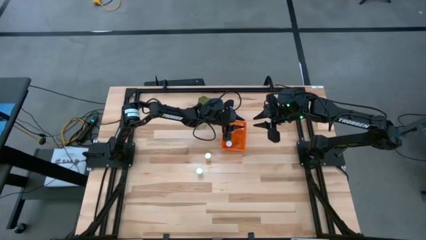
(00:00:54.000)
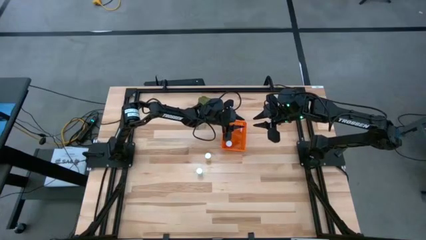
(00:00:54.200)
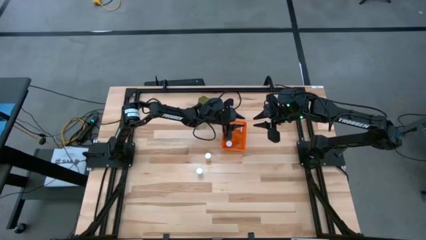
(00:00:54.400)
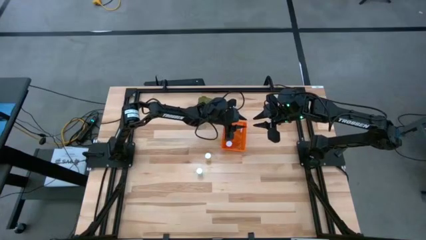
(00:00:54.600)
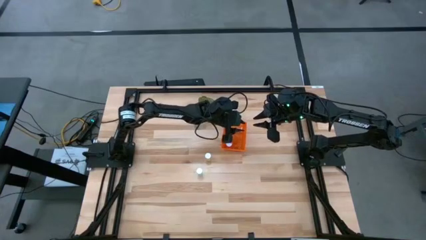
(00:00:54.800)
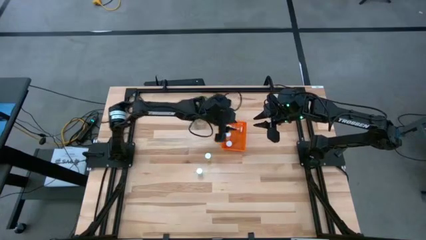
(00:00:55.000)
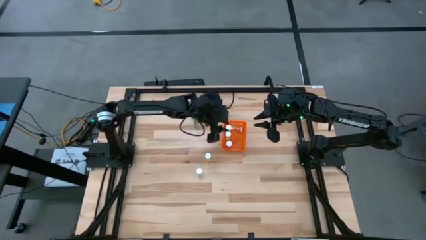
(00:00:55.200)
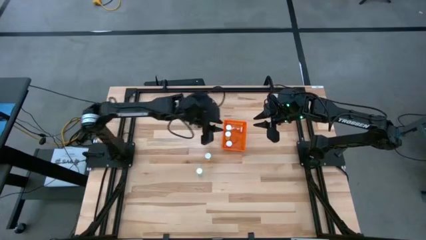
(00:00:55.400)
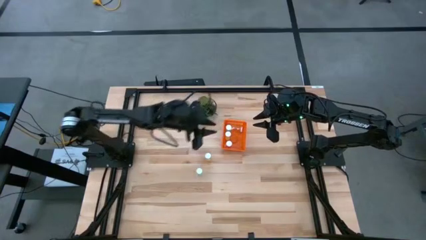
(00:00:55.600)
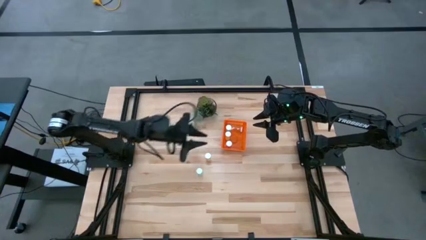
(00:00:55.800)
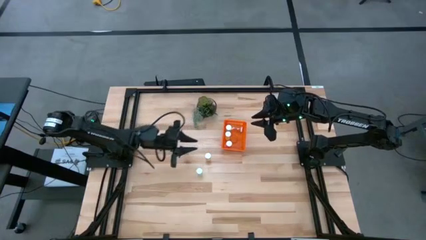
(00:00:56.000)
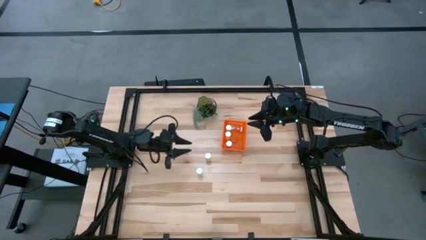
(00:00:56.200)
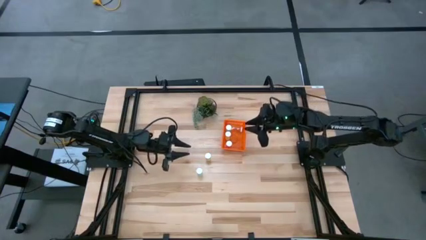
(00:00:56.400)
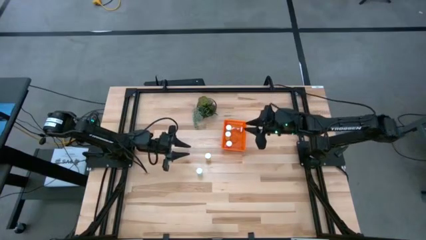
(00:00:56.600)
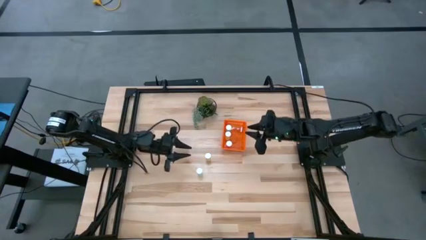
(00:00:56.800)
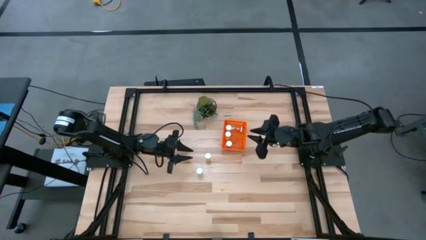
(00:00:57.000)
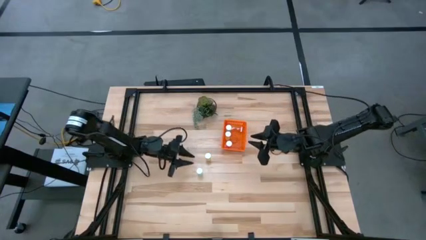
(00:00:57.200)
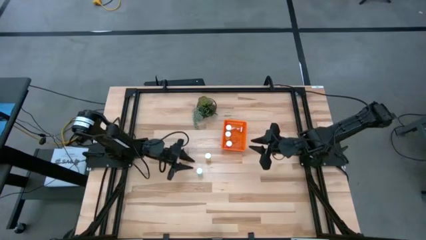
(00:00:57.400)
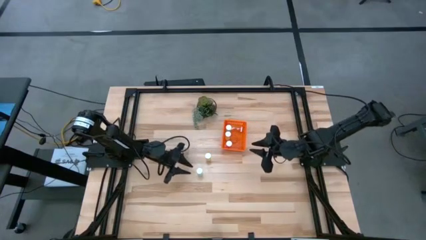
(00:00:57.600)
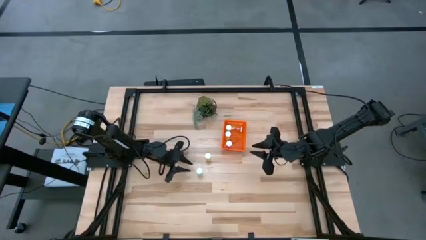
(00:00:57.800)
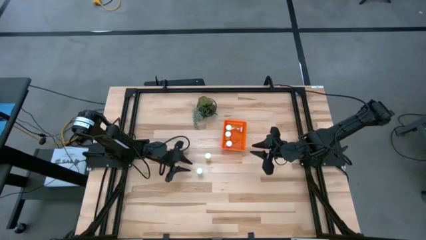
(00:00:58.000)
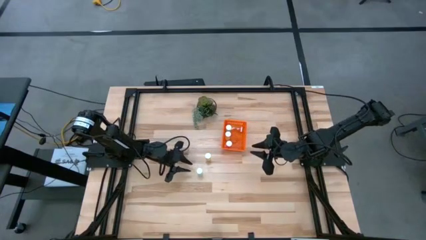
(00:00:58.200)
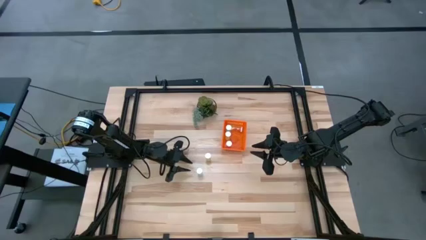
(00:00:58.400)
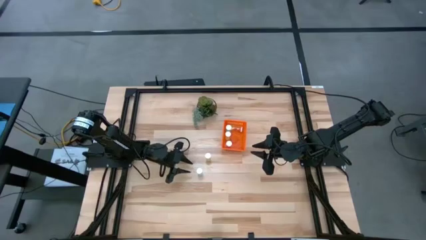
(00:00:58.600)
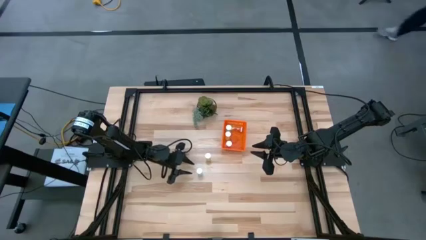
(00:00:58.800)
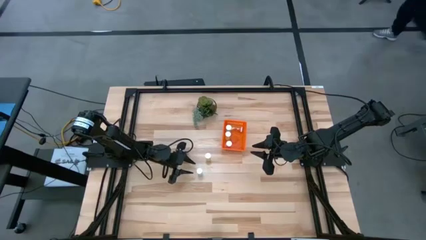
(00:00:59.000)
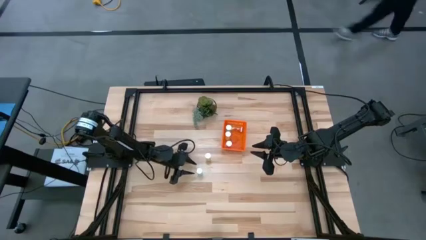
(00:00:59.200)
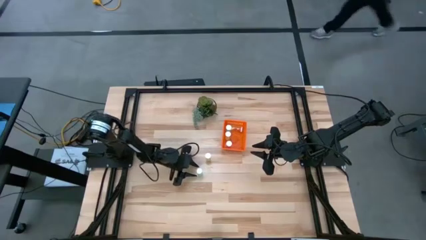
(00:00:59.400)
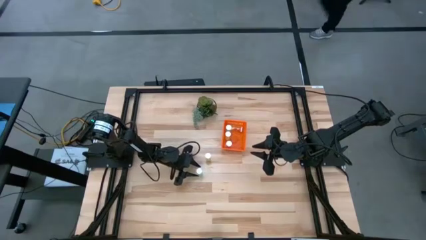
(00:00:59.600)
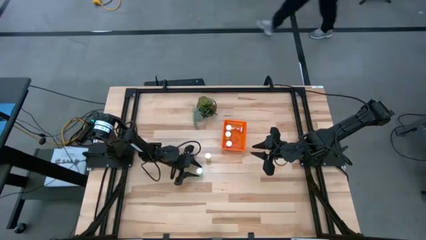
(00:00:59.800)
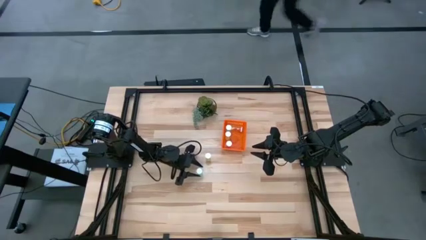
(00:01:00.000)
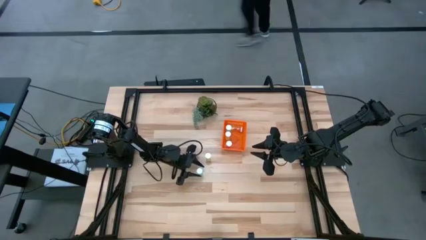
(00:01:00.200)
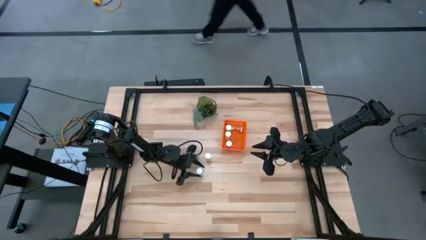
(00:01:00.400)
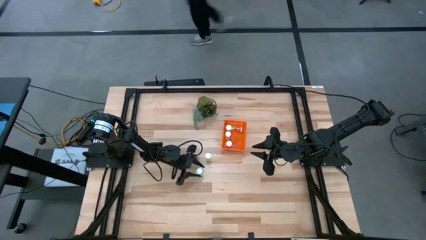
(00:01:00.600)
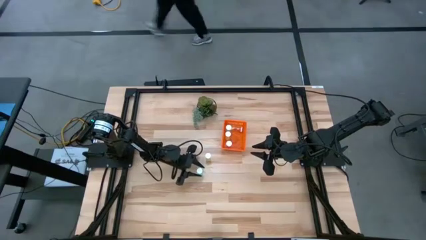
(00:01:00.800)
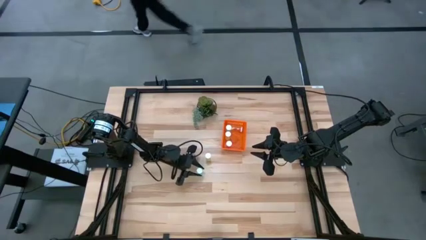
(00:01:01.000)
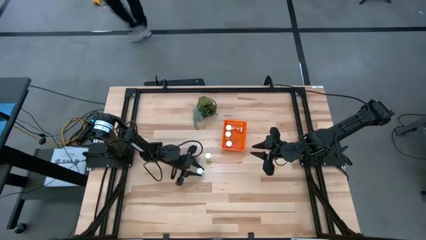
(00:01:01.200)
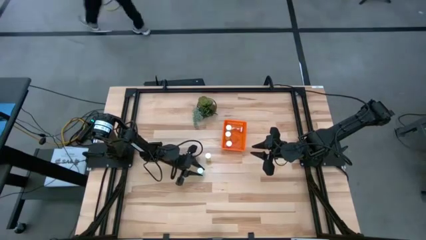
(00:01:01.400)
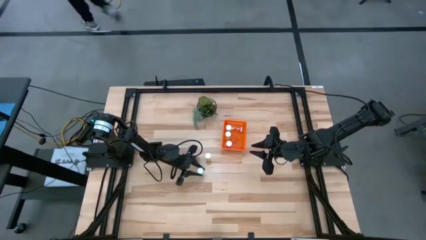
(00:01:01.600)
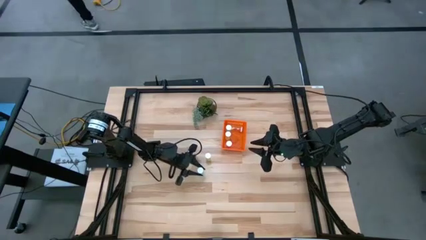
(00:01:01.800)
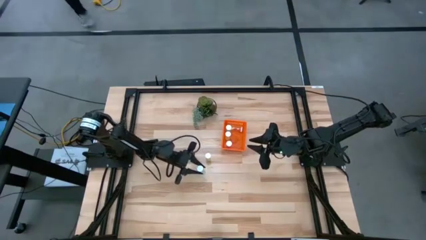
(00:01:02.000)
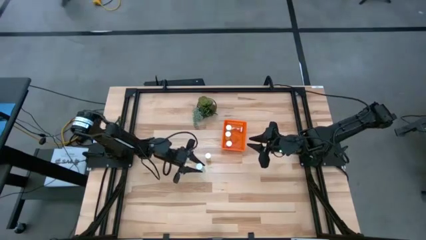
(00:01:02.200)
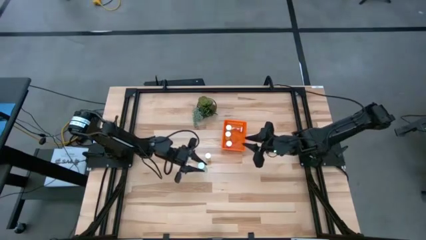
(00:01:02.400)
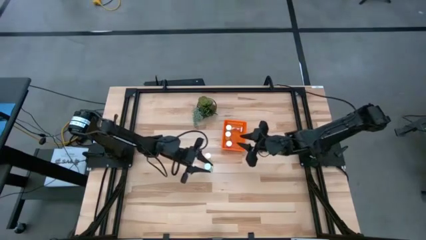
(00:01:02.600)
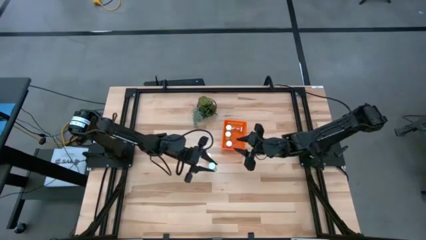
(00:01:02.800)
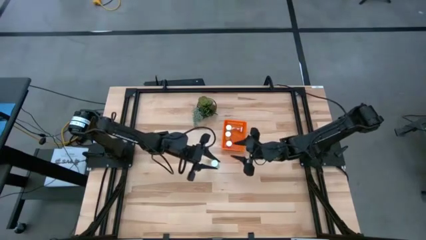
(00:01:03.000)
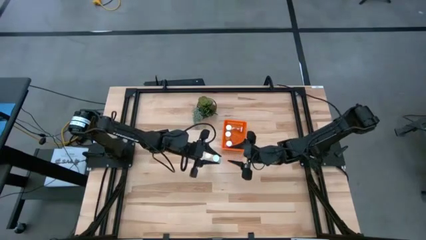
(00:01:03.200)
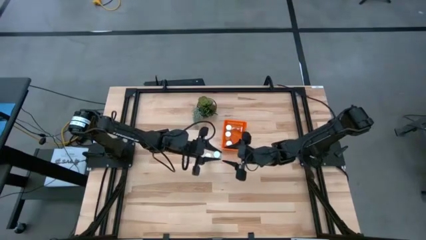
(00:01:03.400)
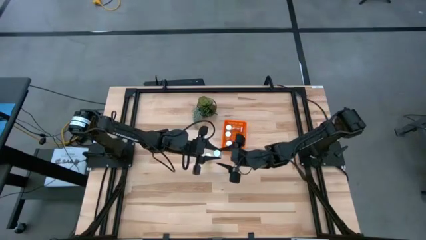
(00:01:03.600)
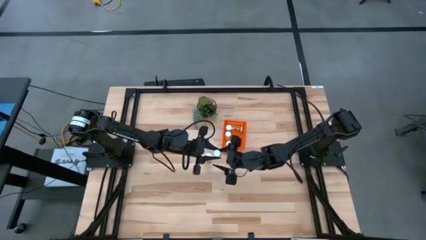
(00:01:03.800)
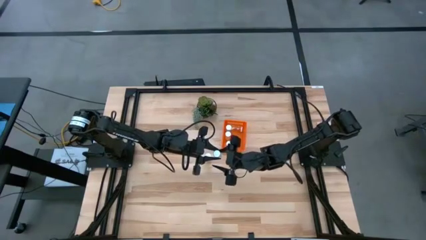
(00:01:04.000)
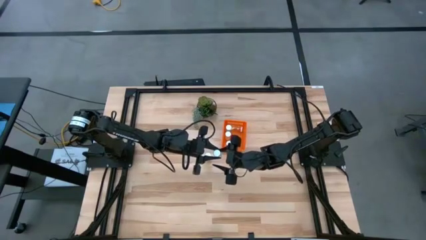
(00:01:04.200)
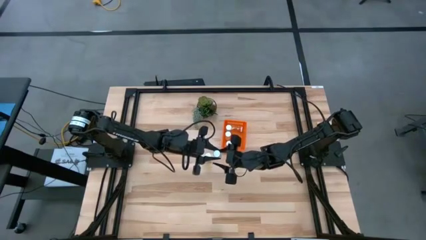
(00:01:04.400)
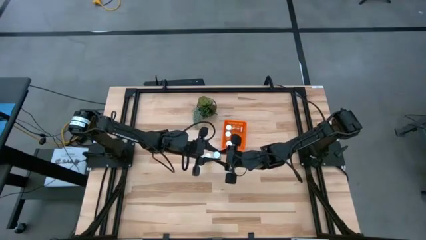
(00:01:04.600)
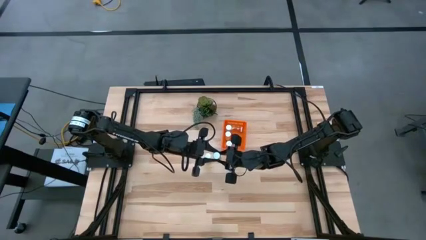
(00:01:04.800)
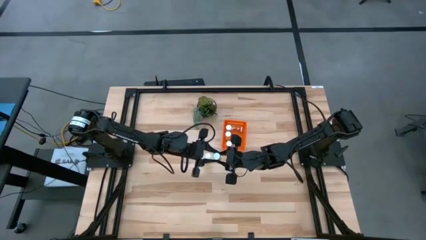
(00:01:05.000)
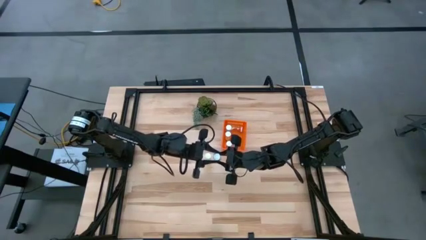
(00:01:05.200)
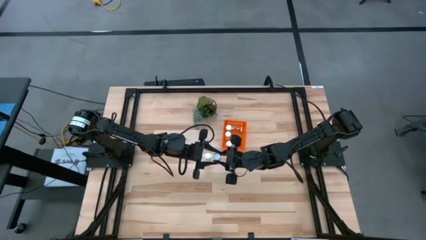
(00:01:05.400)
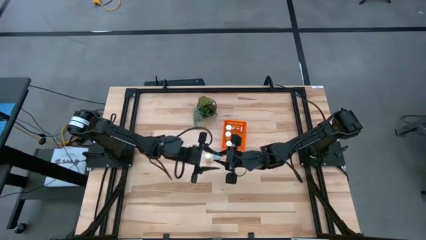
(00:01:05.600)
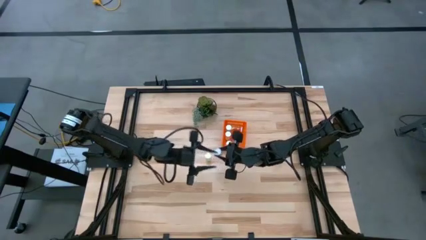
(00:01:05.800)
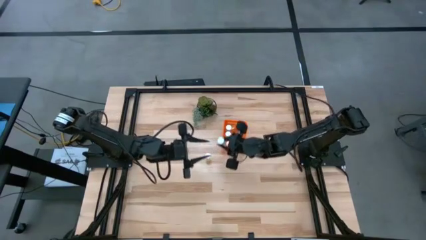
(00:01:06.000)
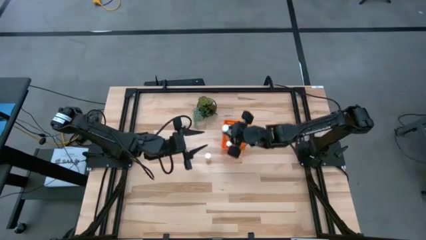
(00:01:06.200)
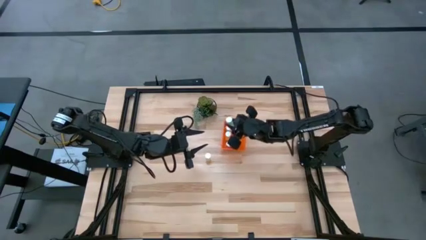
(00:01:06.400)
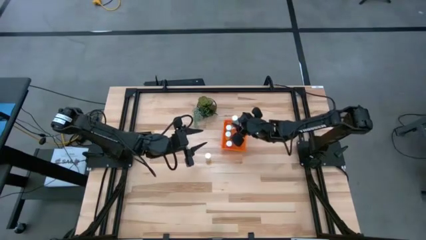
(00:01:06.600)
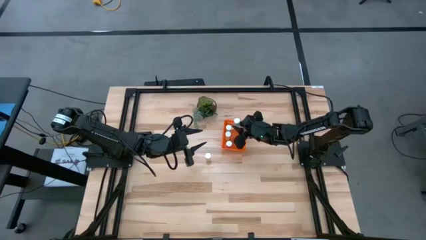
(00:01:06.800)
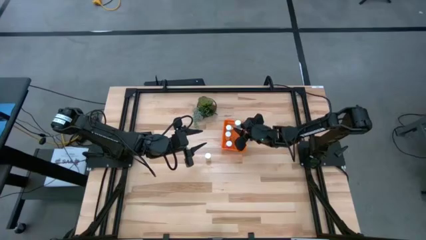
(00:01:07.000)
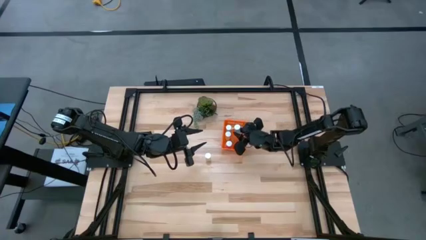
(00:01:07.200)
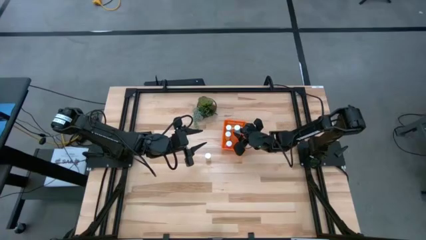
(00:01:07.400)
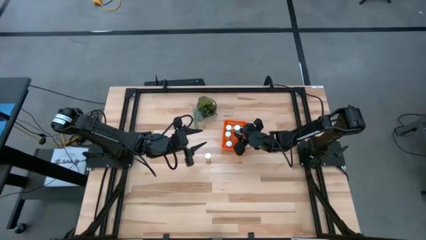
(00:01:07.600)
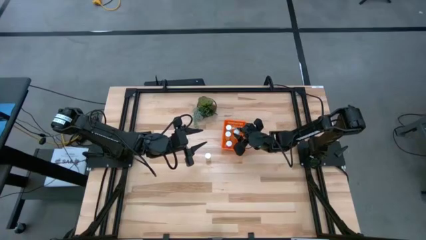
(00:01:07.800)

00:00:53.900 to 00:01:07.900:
Task: Pick and place pill bottles into a basket
Put the blue pill bottle into the basket

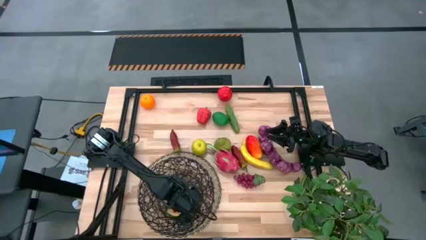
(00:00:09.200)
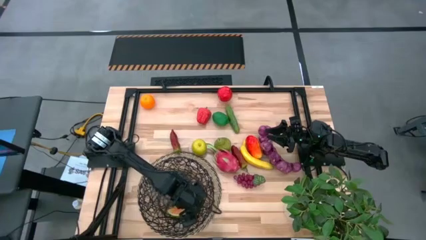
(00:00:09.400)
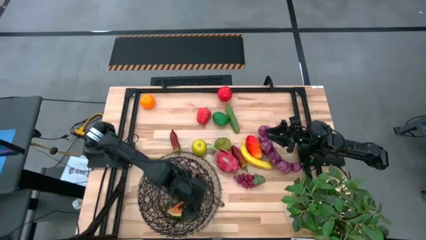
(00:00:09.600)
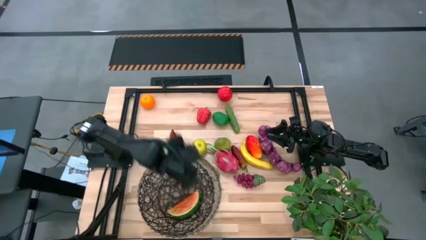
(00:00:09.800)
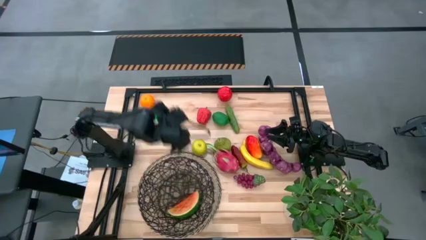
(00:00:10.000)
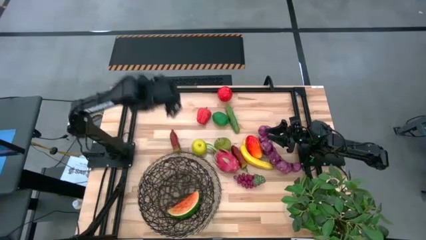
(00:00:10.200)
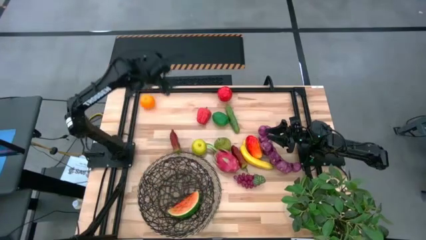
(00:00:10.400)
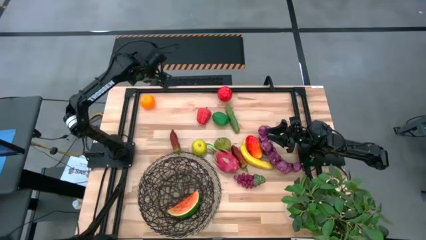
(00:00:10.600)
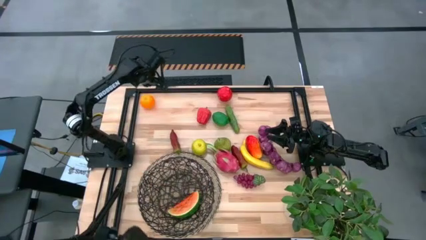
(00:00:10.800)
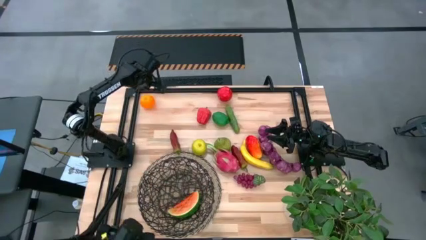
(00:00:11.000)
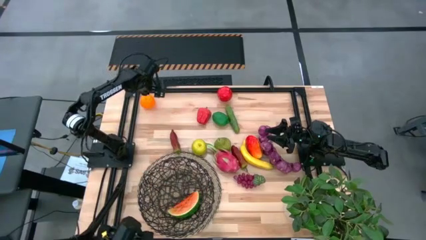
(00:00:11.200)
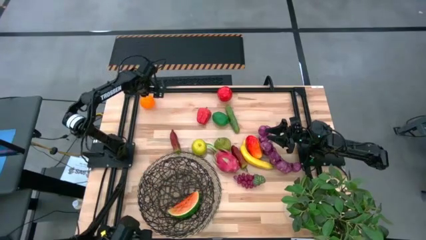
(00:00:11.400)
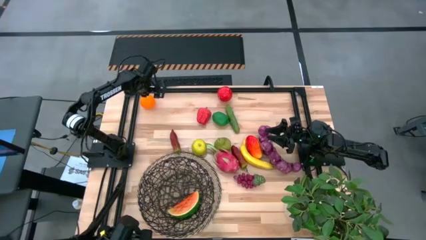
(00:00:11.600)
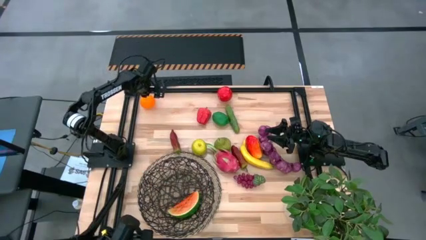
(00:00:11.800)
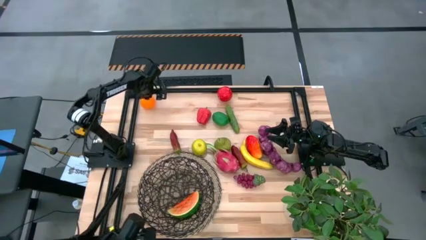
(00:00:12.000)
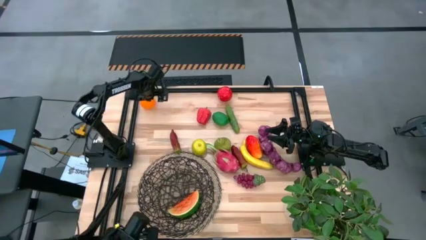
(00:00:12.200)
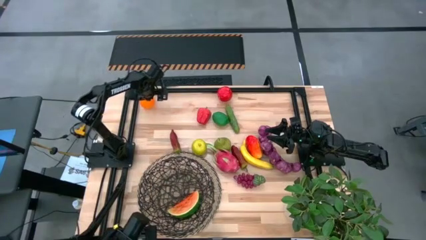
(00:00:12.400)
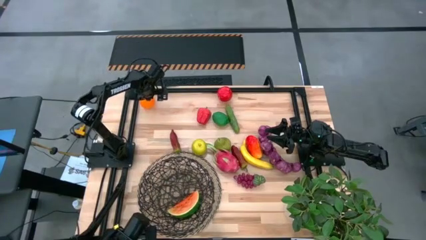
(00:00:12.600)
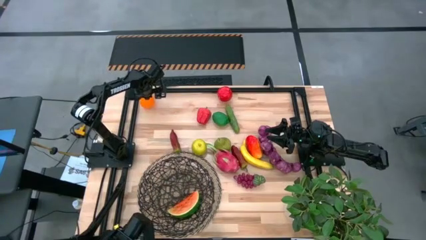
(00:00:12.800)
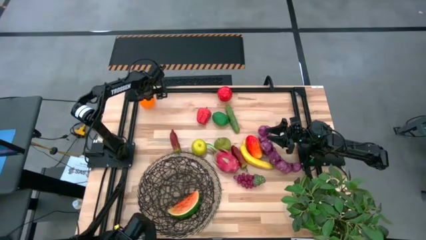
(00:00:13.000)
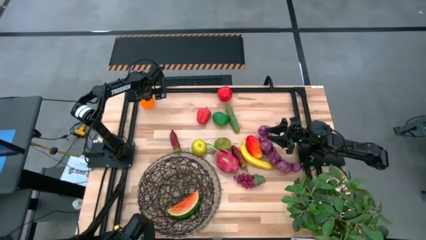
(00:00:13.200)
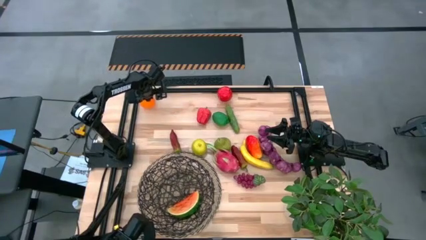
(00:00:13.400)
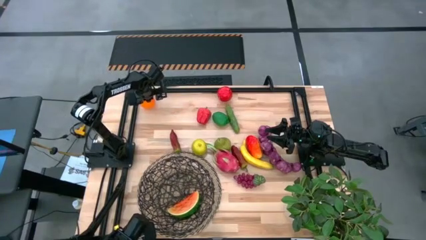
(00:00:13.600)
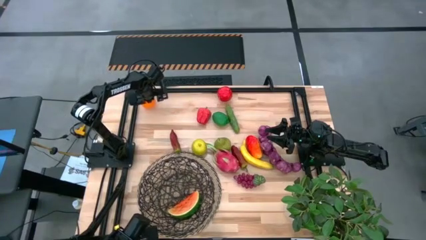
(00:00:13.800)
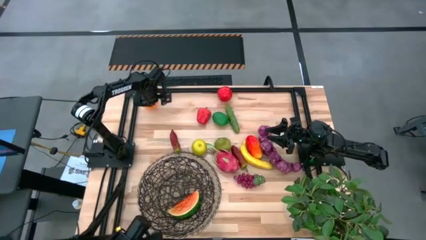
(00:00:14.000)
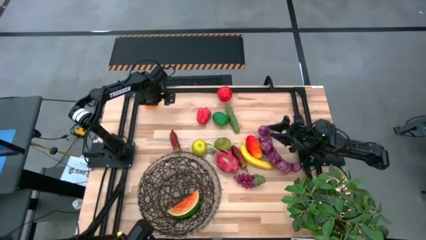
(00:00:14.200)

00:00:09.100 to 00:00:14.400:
Task: Build produce basket
Put the orange into the woven basket
